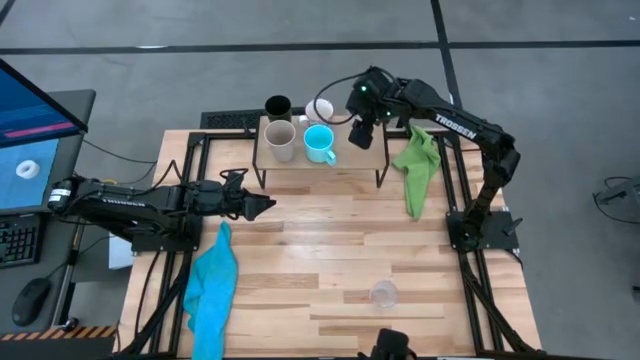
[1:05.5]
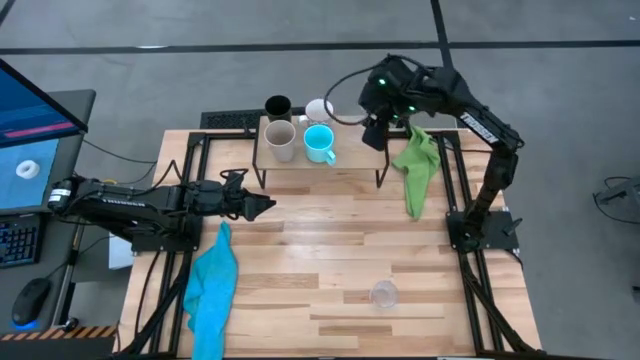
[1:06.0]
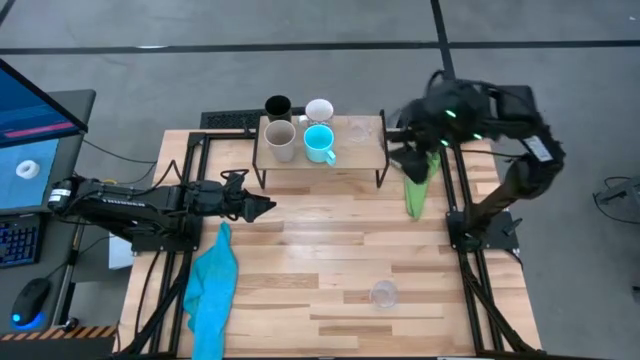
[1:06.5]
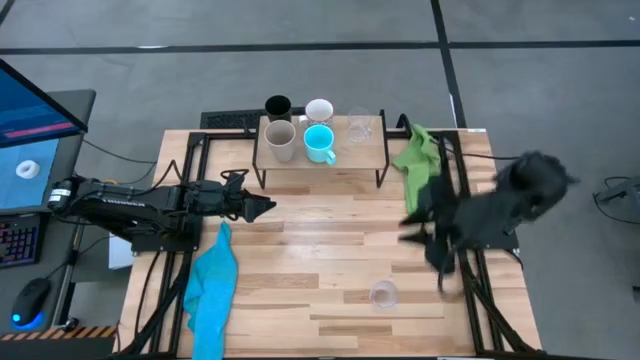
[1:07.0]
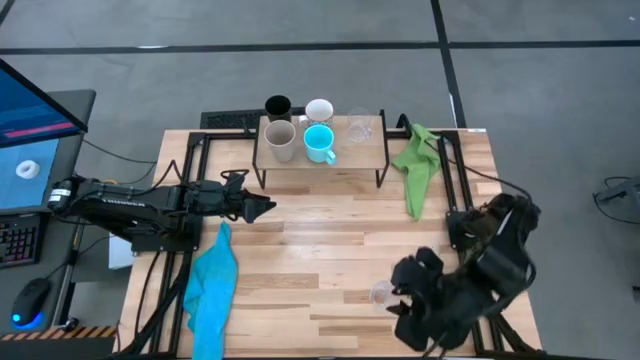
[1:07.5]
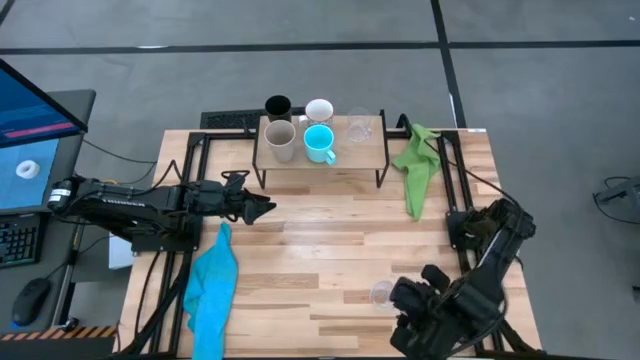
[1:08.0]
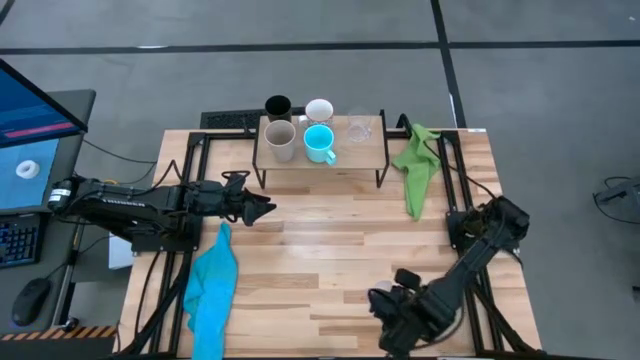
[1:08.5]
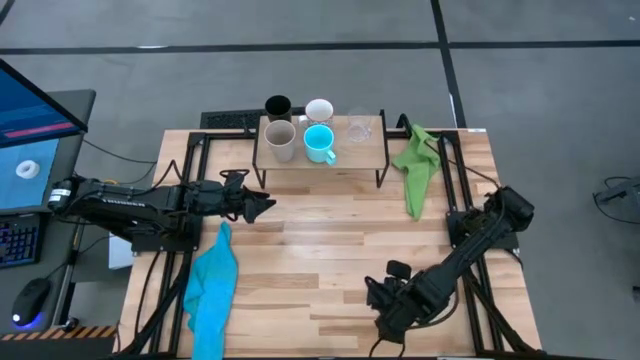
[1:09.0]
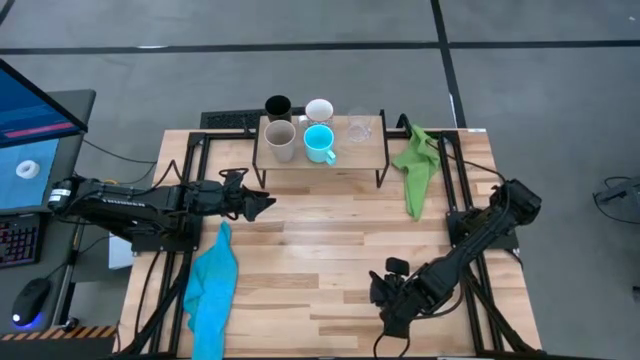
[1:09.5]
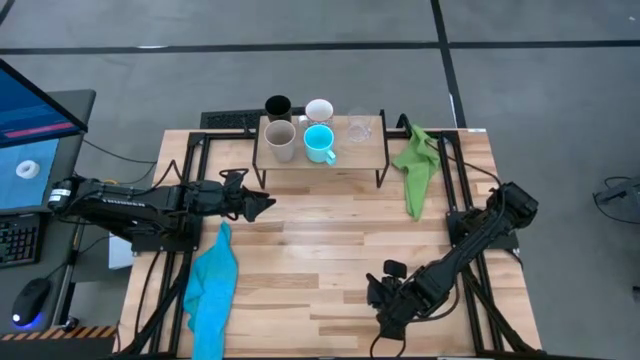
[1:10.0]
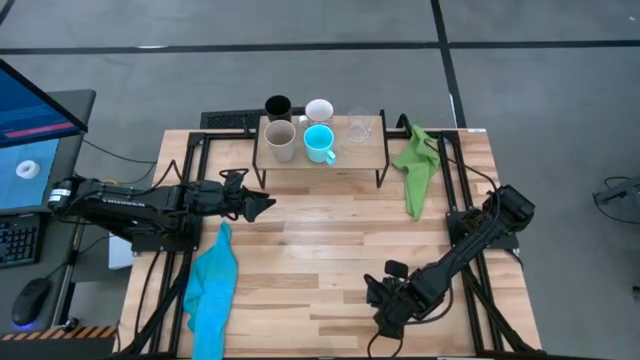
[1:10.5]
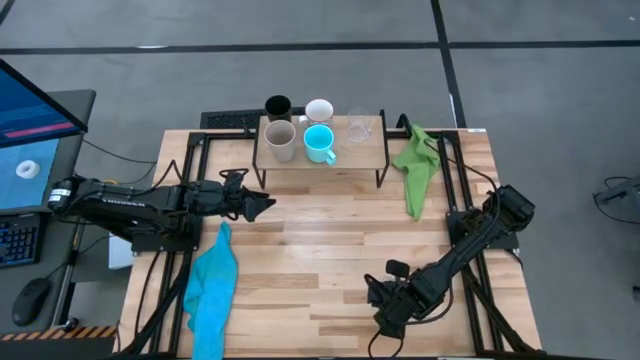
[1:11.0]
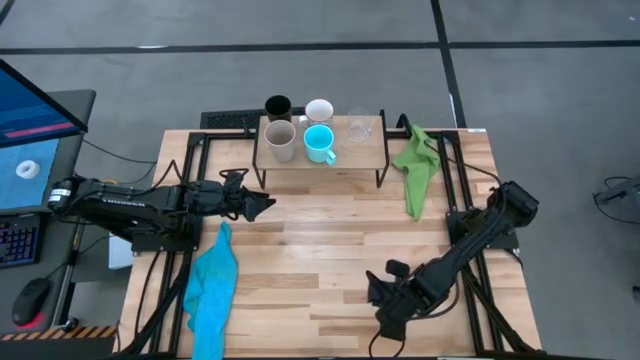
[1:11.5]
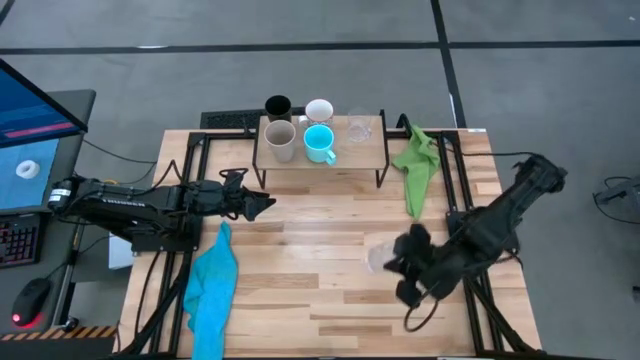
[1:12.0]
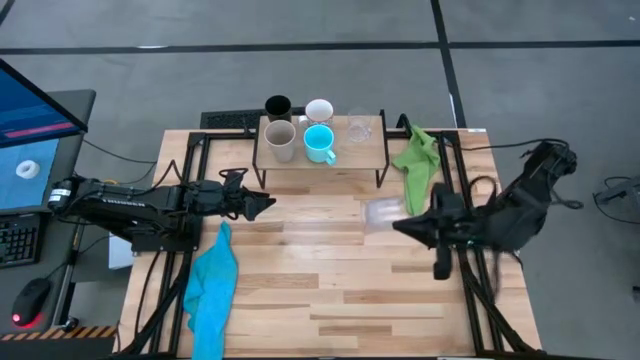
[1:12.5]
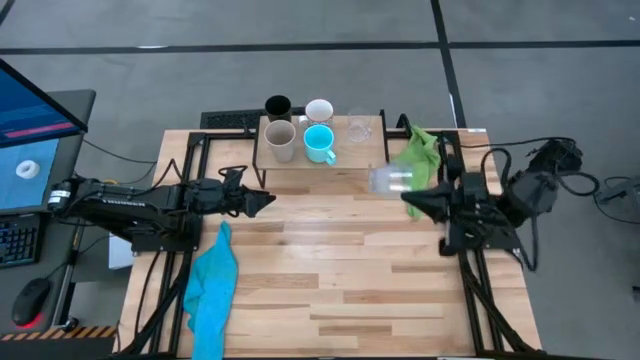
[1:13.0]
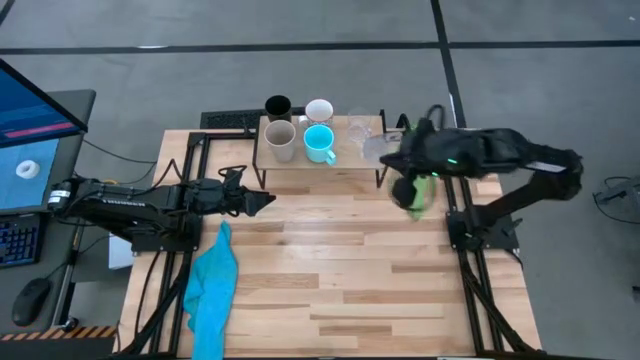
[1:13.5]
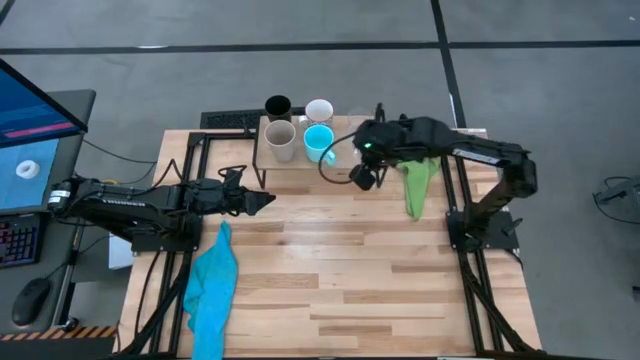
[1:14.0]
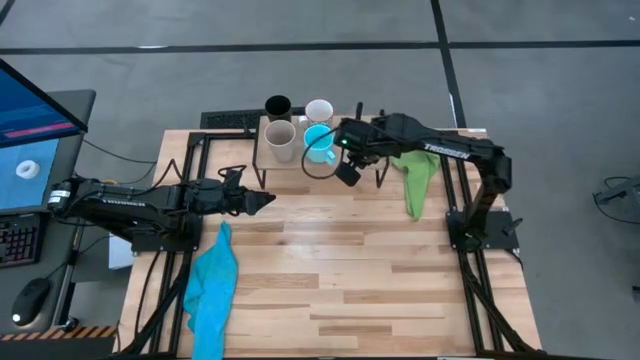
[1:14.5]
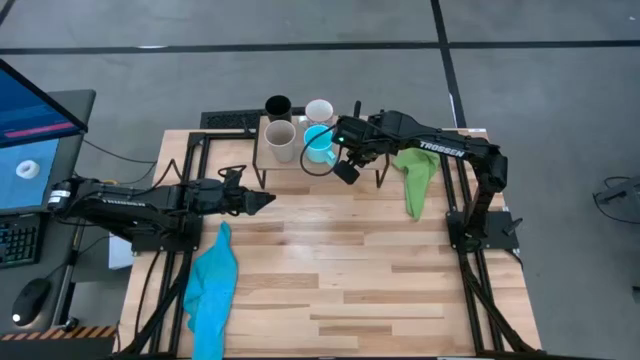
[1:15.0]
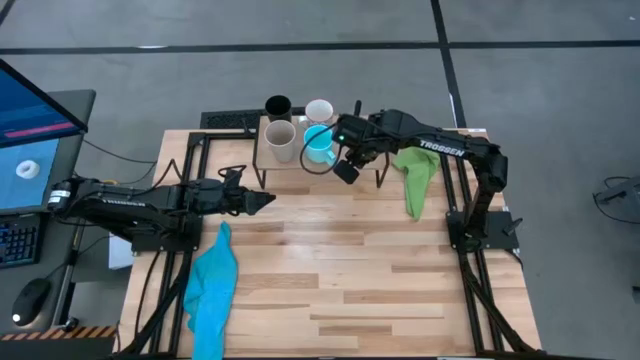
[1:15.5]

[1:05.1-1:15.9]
Task: Stack small to large cups/mugs on shelf
Put the transparent mug on the shelf

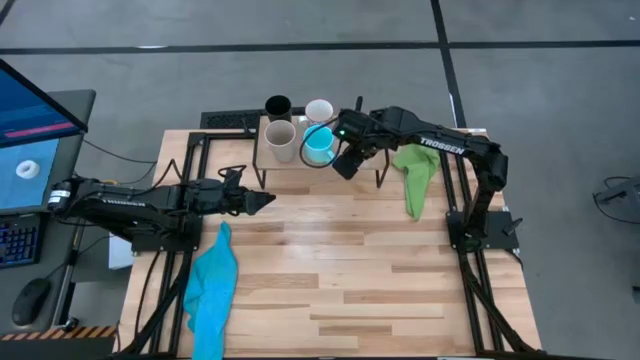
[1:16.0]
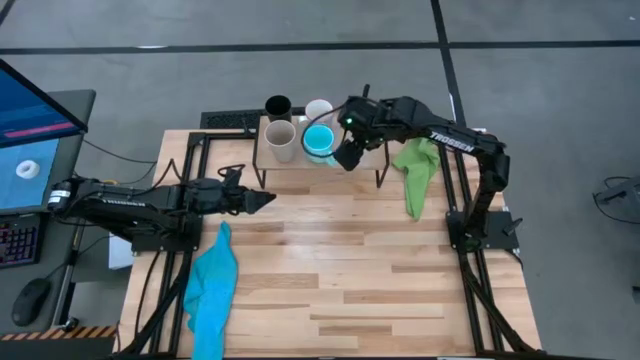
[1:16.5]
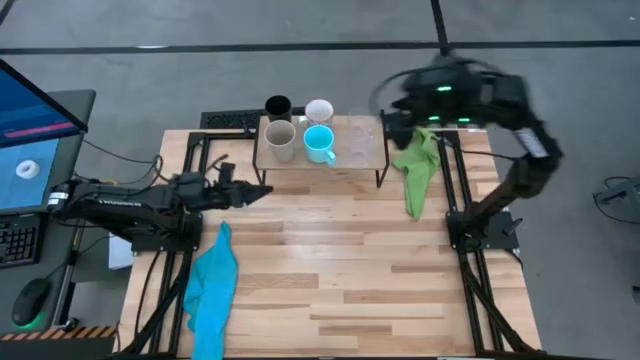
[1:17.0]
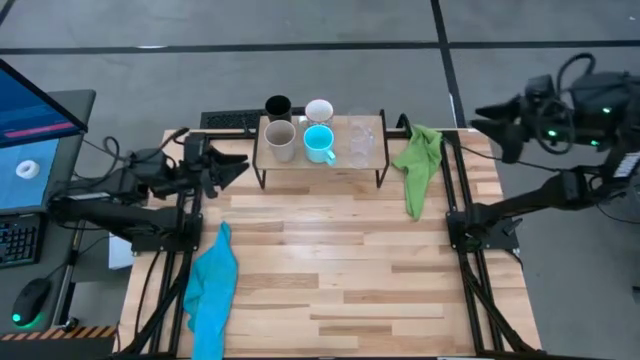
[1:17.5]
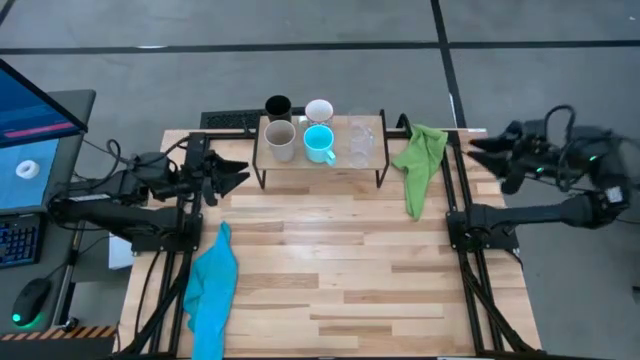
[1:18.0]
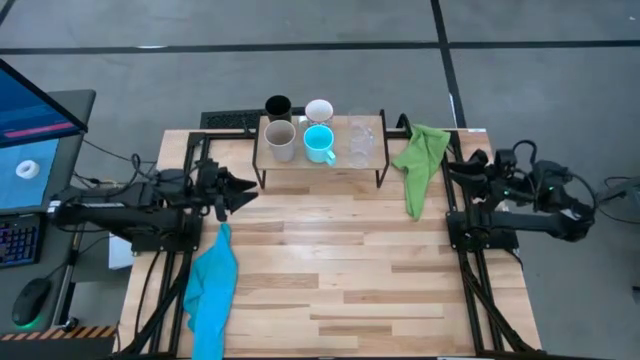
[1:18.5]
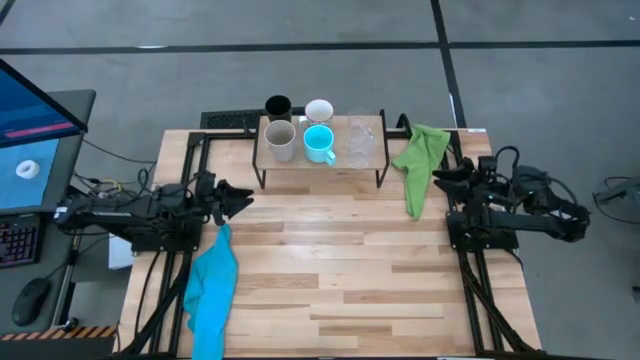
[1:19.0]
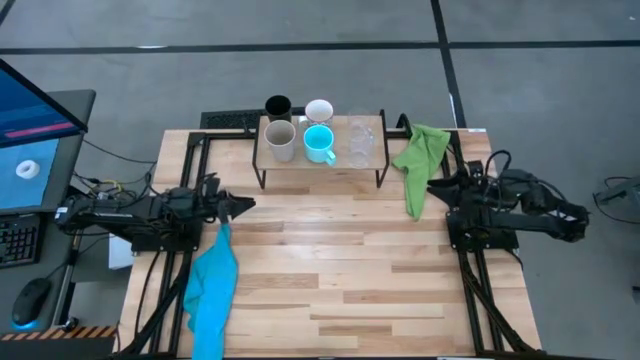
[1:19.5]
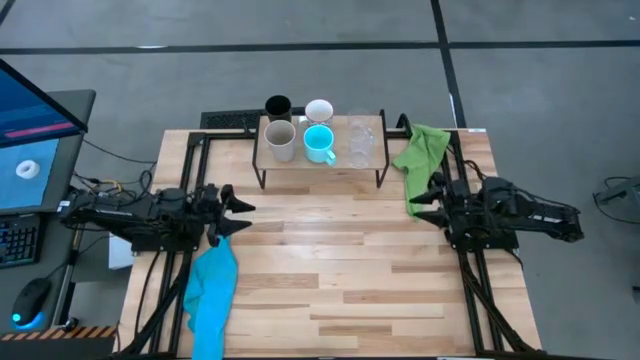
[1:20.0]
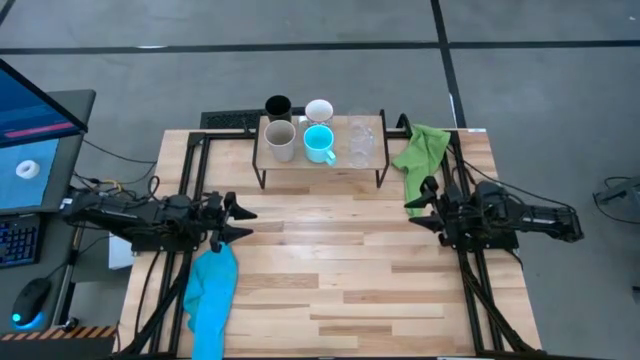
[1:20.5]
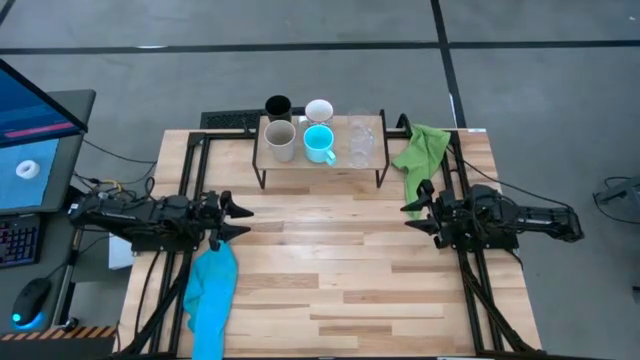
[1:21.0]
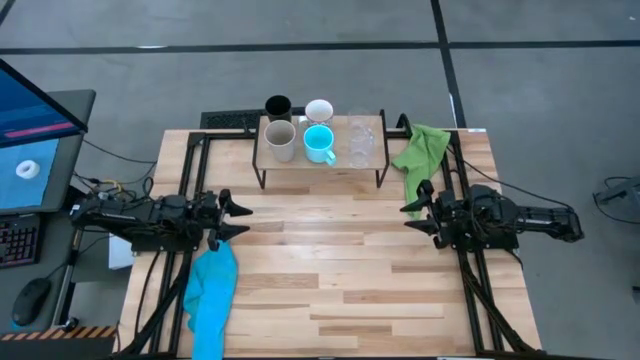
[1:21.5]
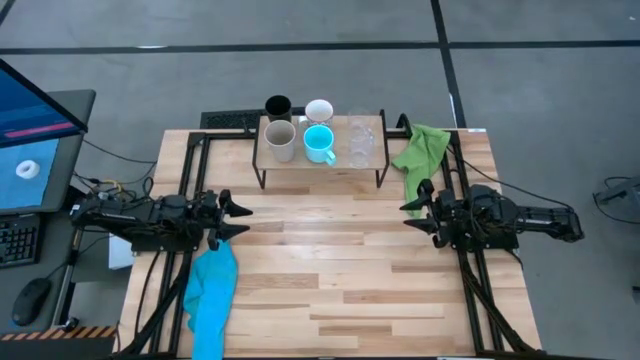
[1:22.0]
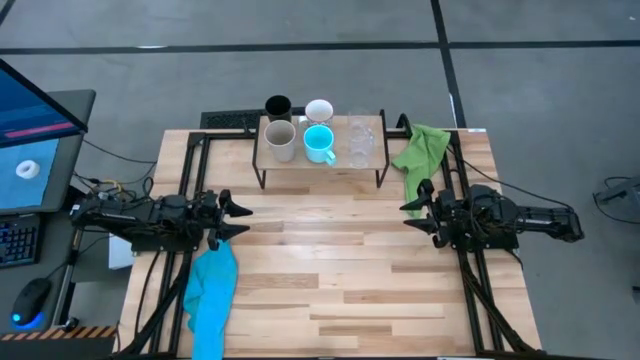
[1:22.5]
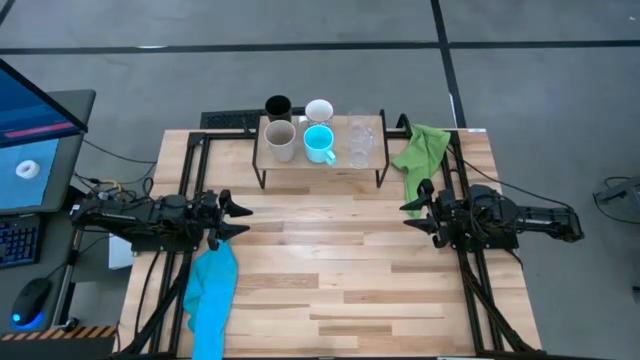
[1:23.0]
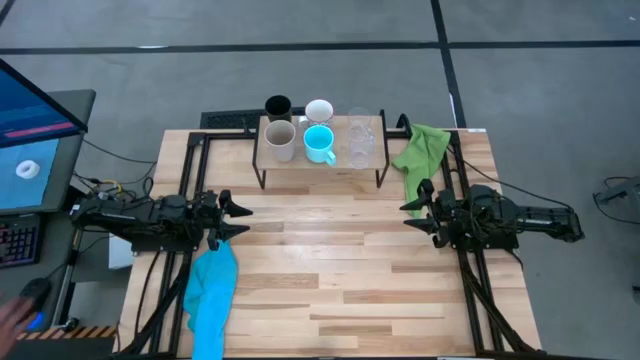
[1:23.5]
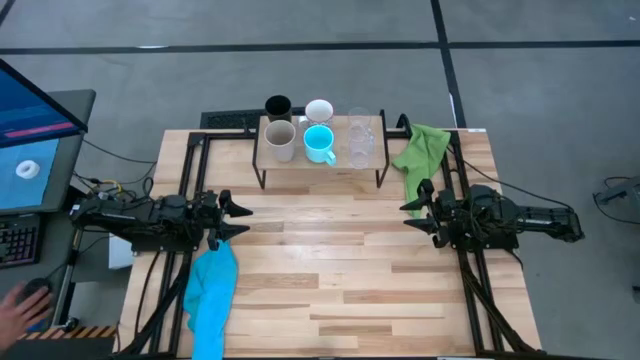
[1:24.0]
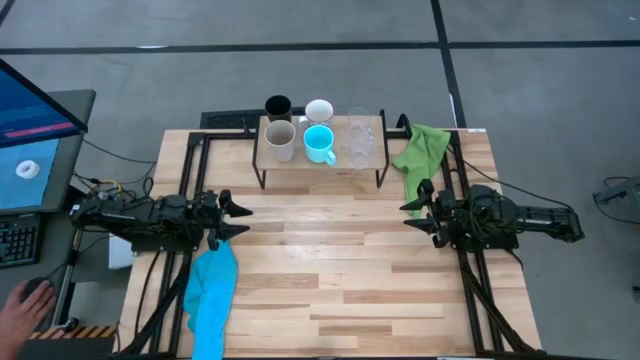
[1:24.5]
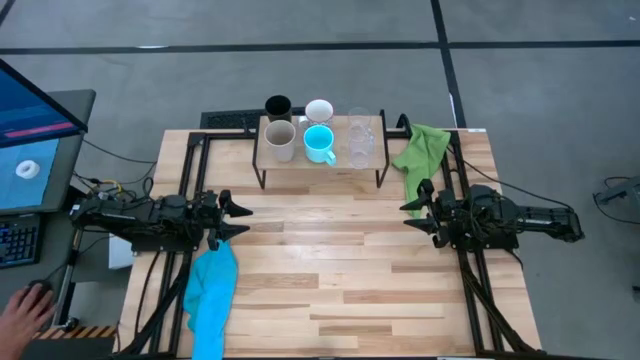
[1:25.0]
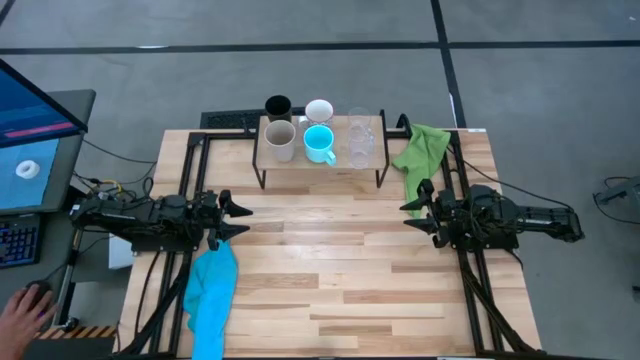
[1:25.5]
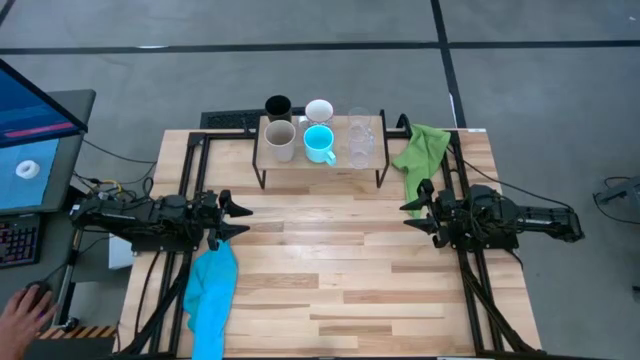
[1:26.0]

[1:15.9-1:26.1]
Return to Home Position

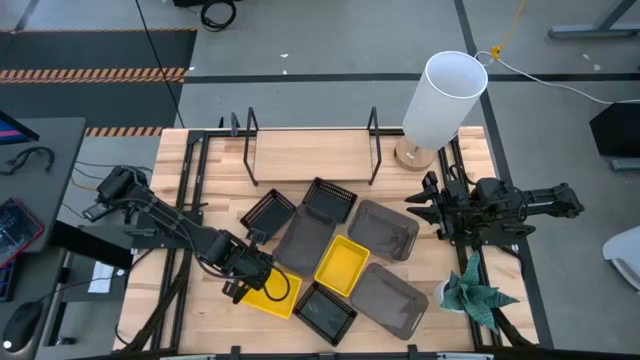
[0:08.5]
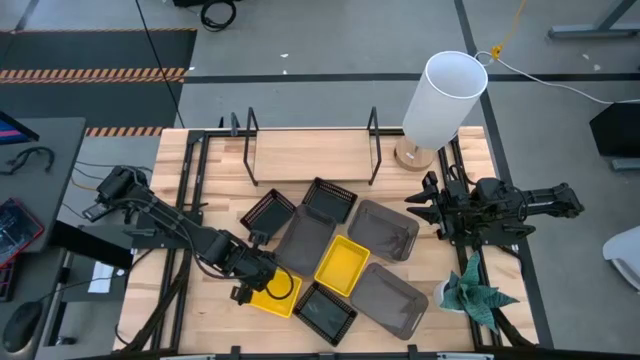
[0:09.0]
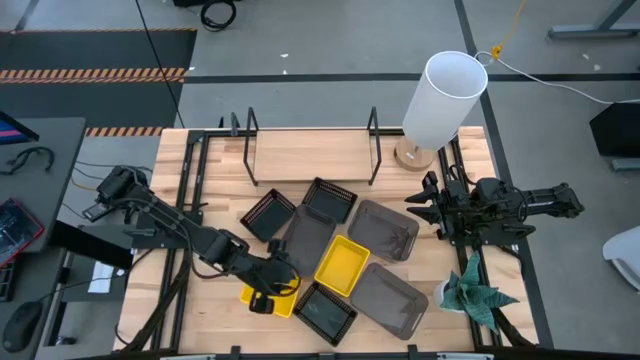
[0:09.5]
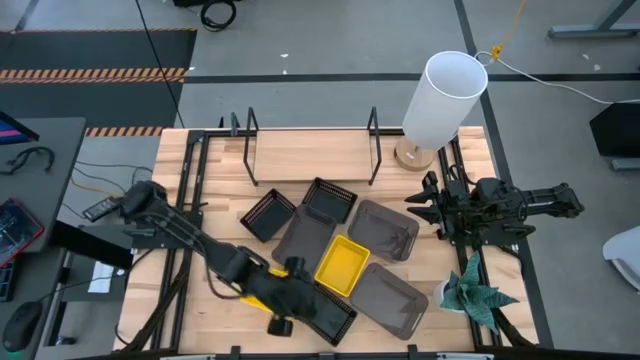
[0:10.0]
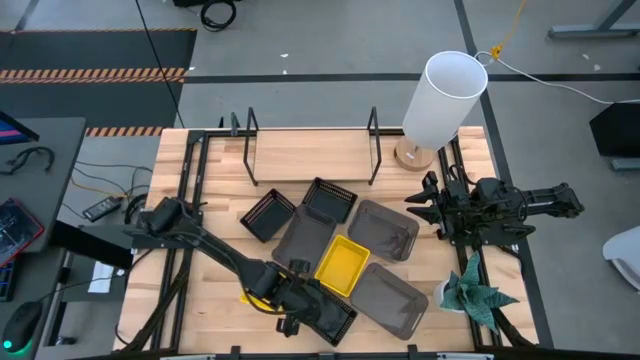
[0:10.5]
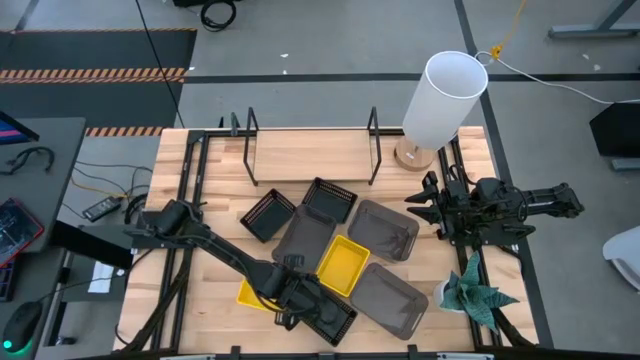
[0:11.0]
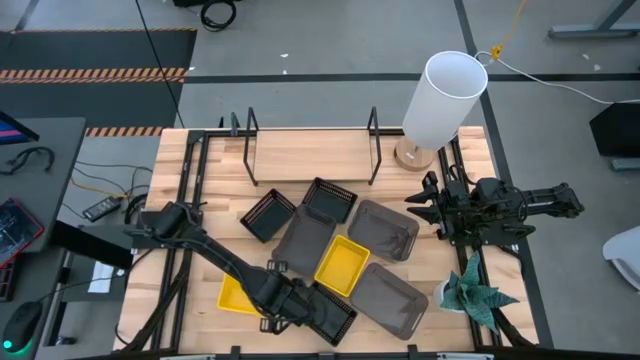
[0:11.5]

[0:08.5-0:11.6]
Task: Stack baskets on shelf by color
Adjust the stacked yellow bins
